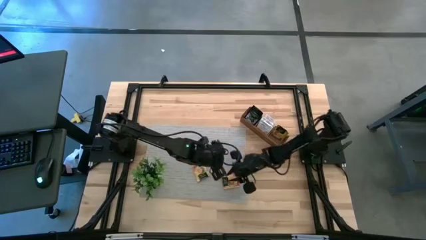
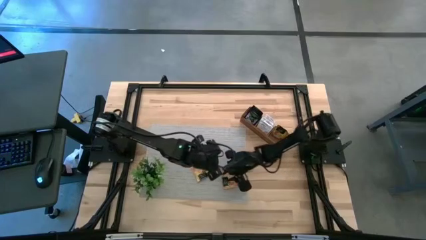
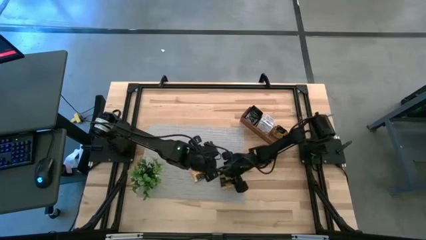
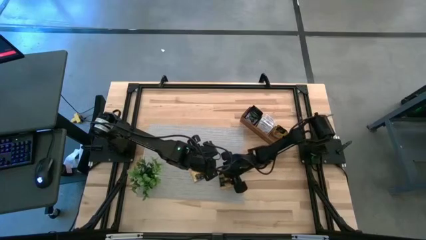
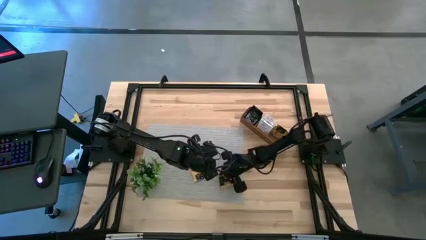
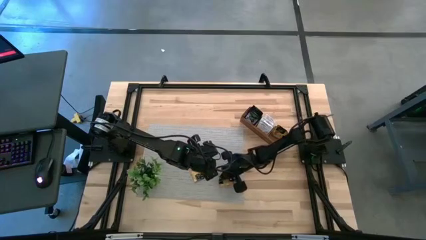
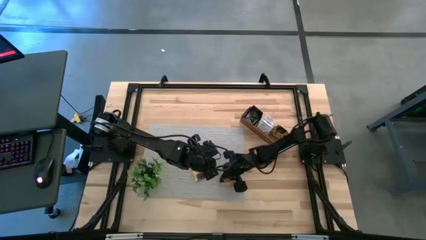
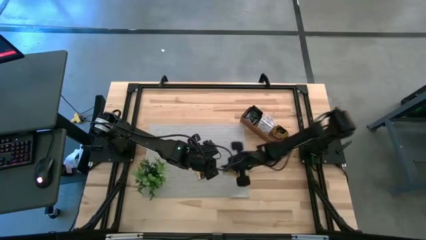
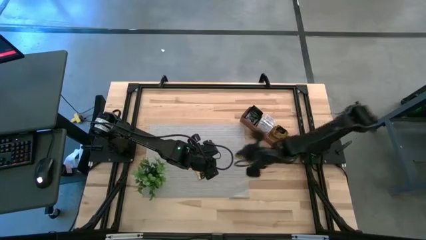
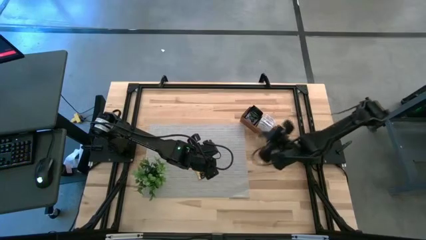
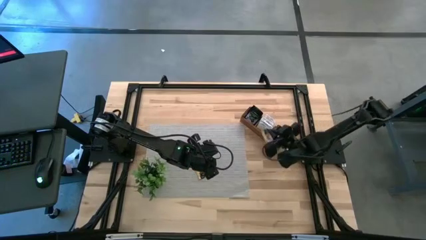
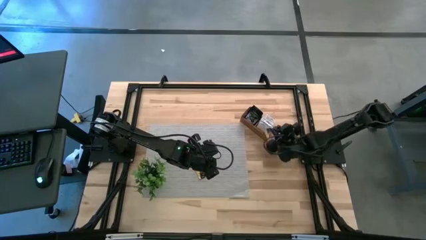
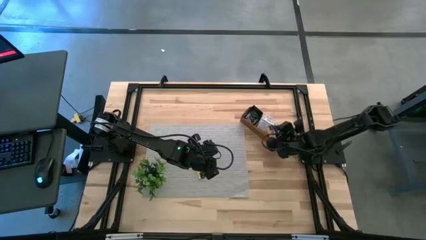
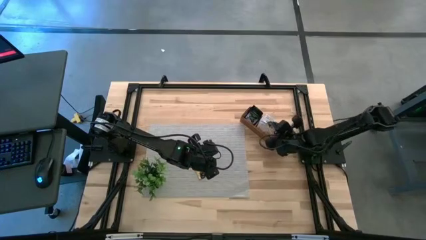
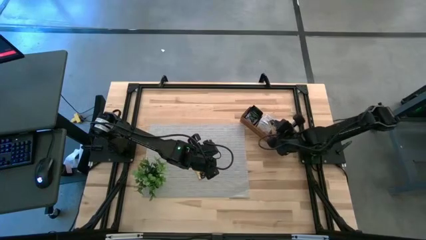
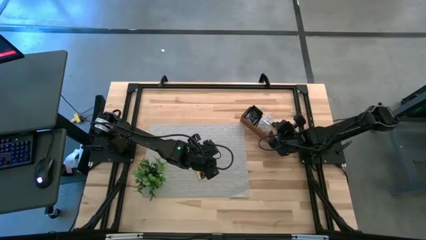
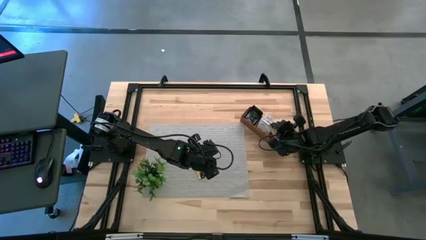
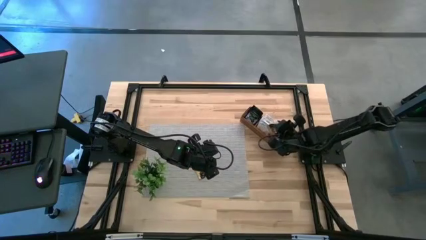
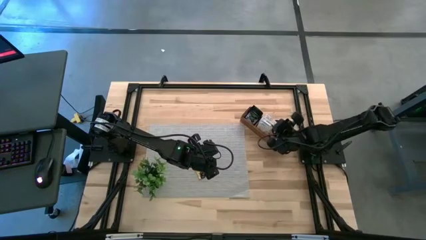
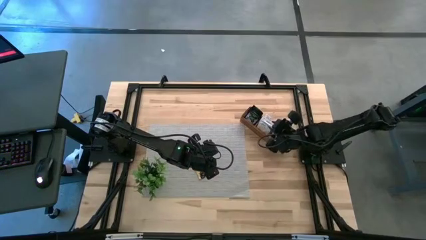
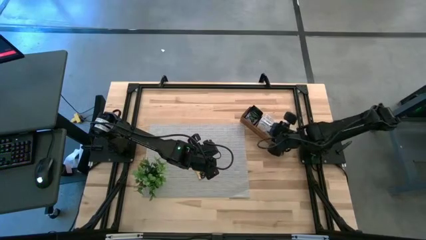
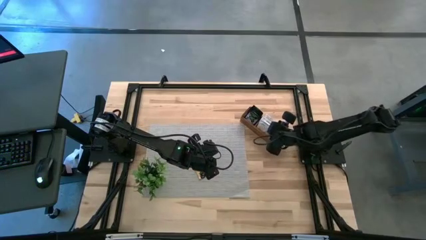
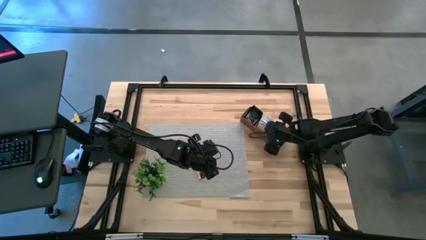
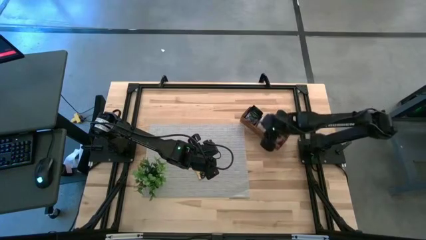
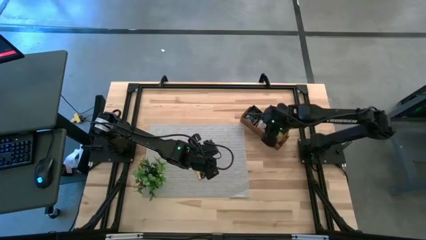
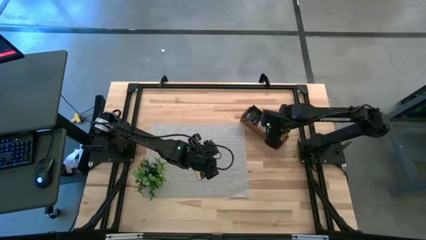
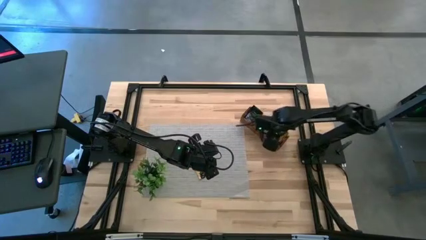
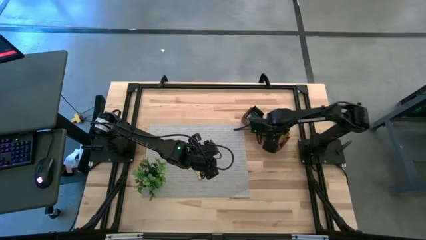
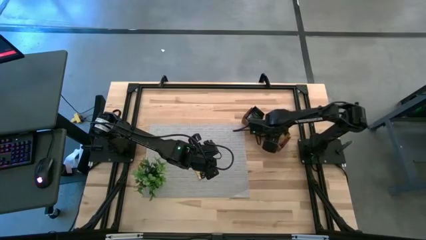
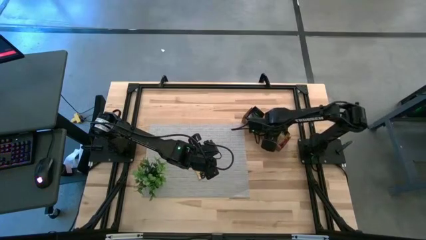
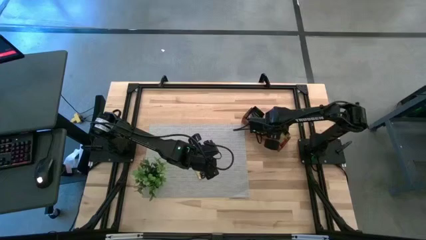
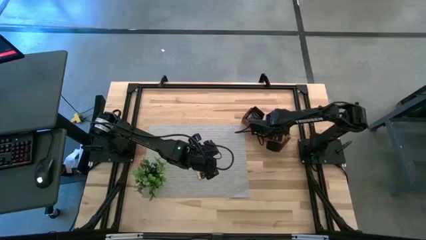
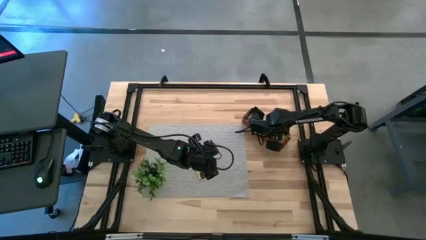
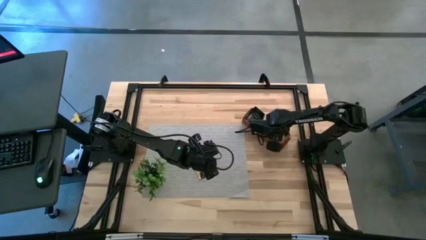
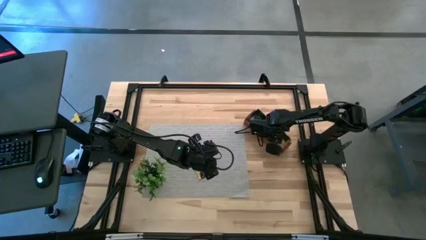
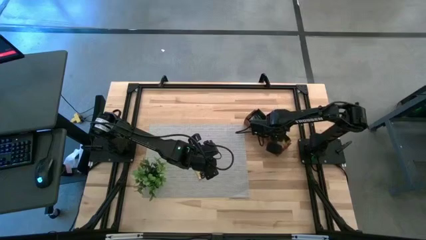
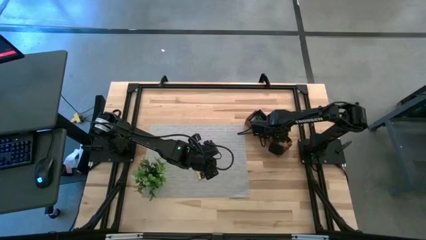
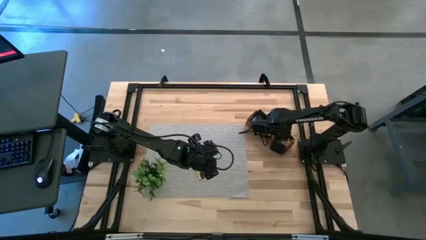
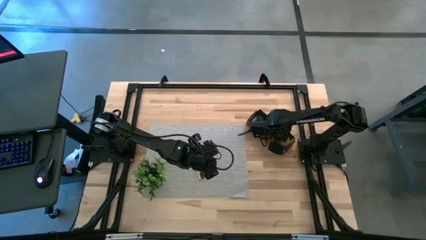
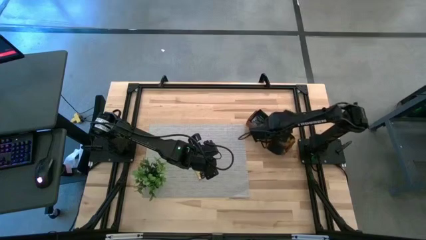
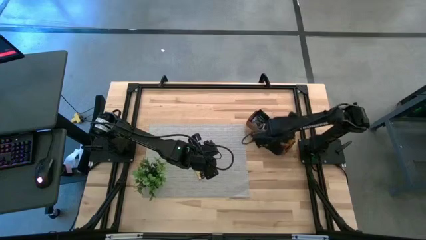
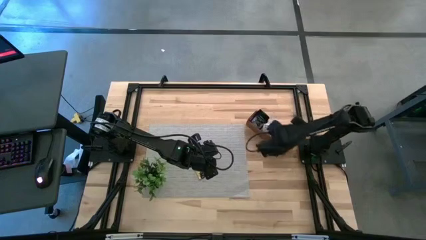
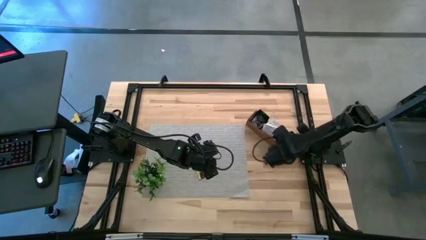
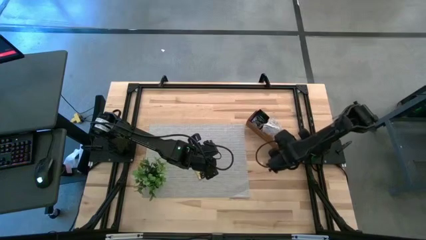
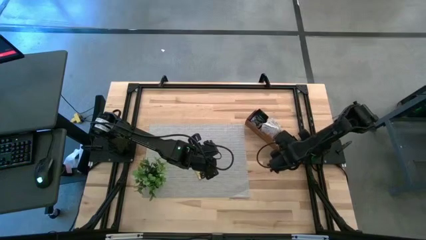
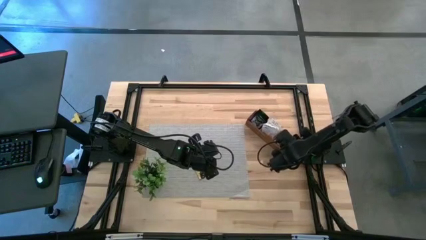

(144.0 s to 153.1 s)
Task: Pick & Place Tea
Put the yellow tea bag into the right section of the wooden organizer

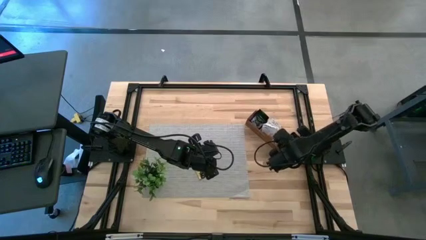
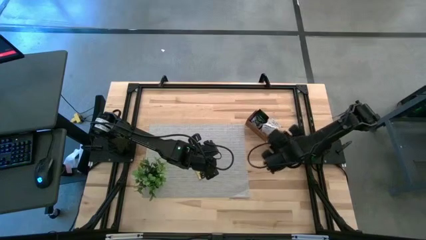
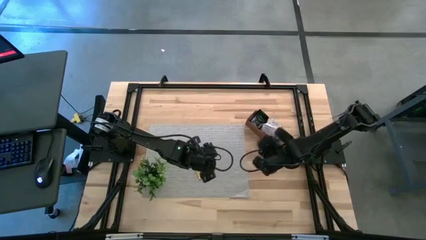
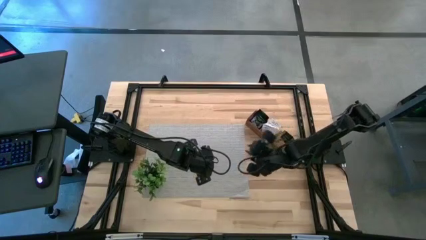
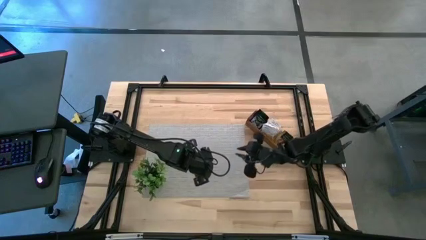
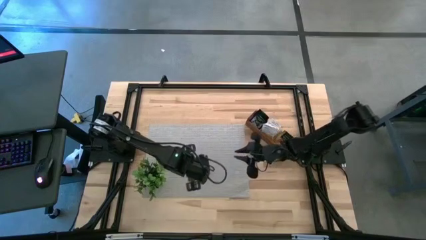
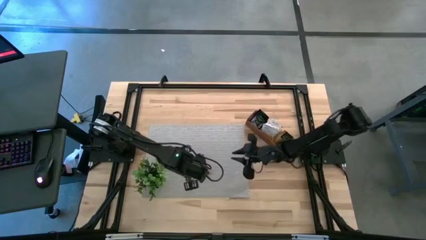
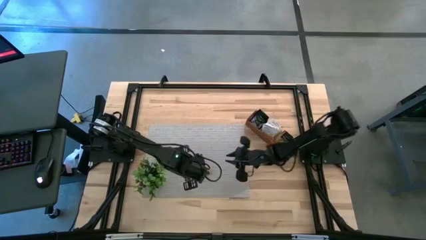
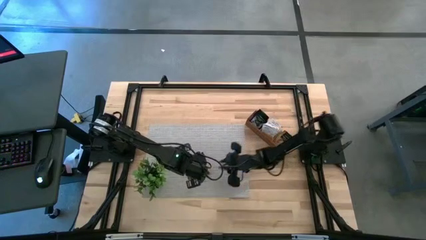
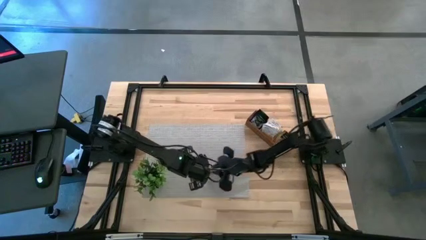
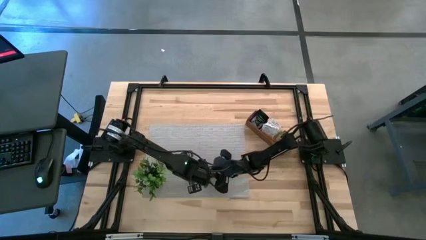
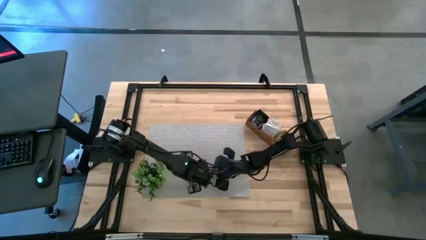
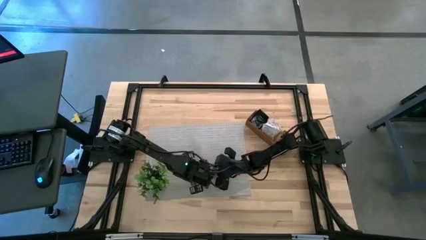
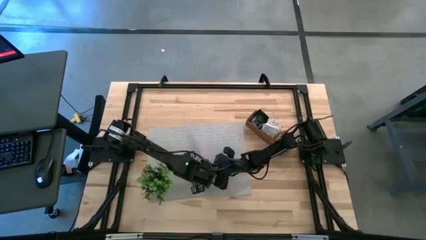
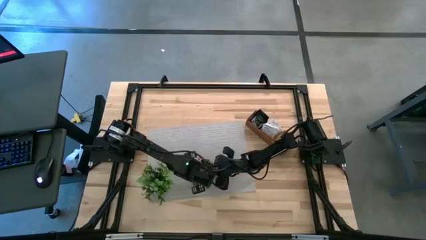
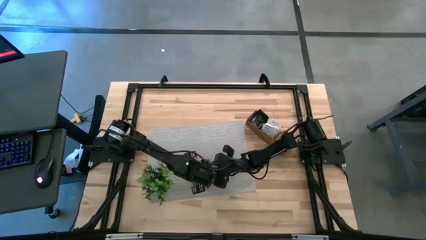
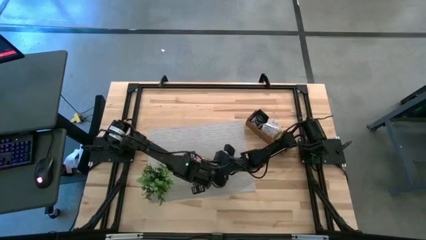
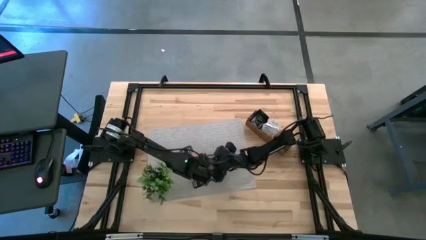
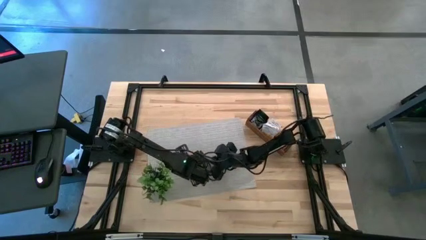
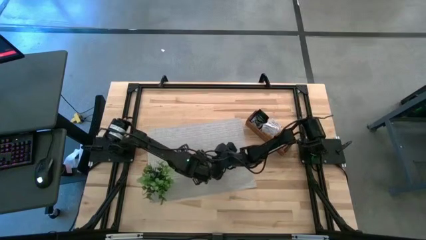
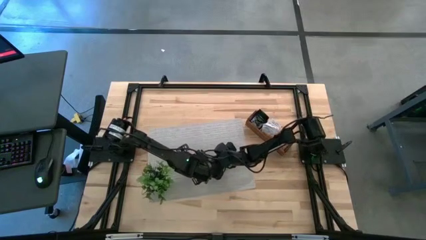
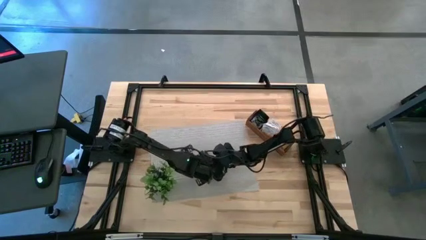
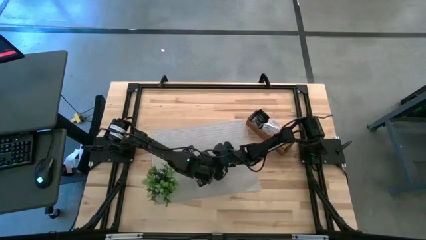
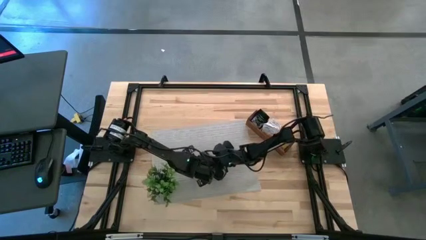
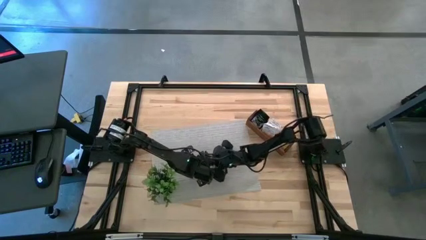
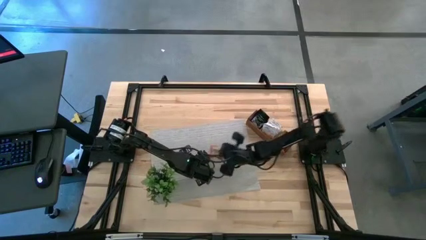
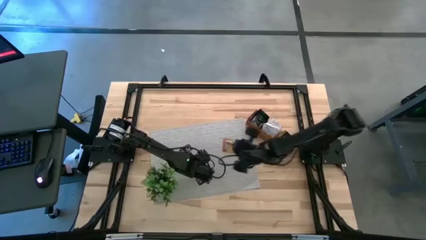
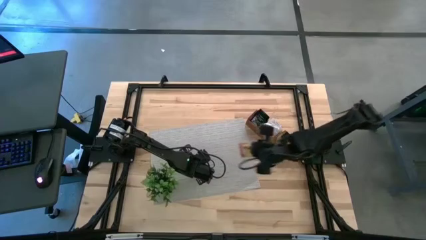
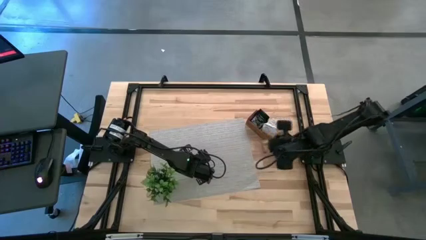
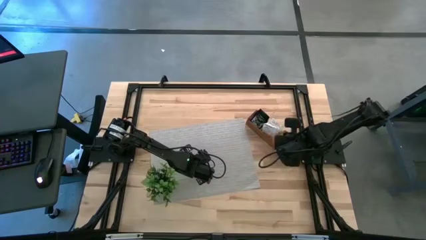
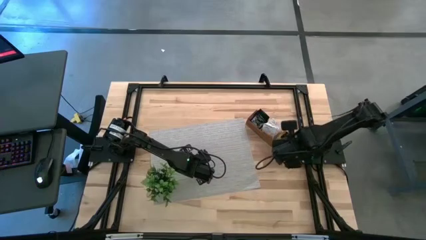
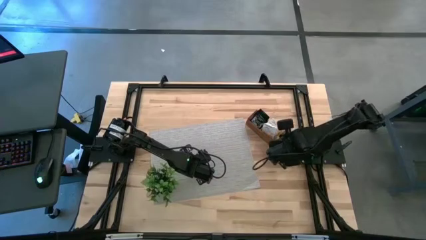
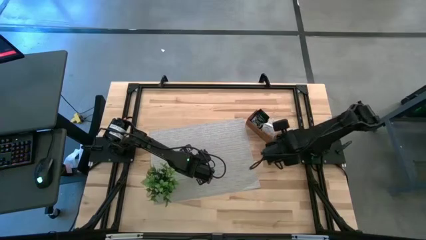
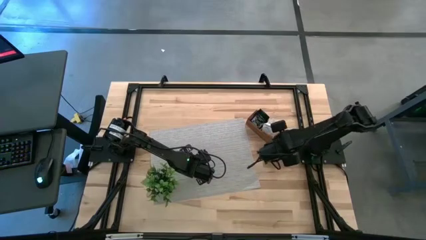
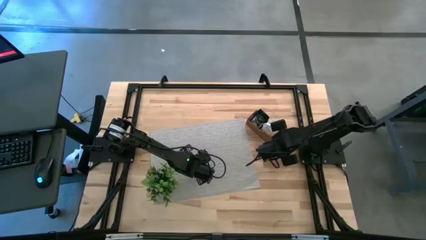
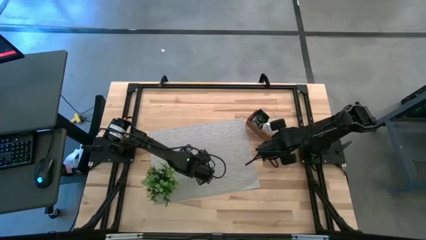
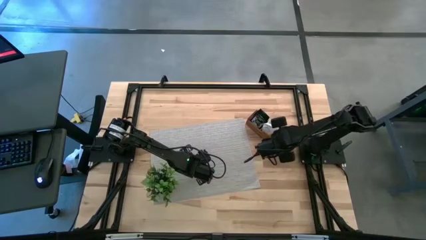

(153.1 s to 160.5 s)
Put the yellow tea bag into the right section of the wooden organizer
